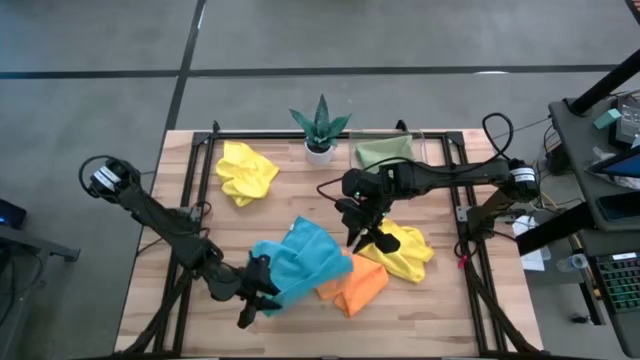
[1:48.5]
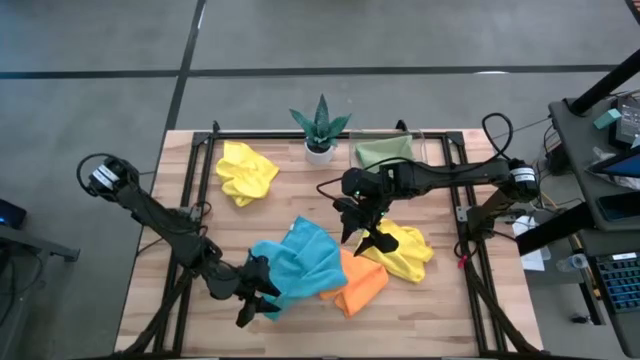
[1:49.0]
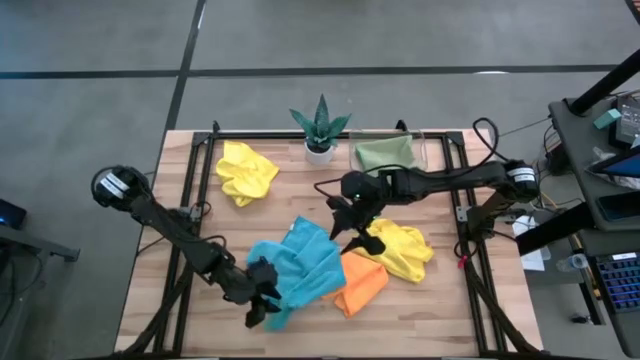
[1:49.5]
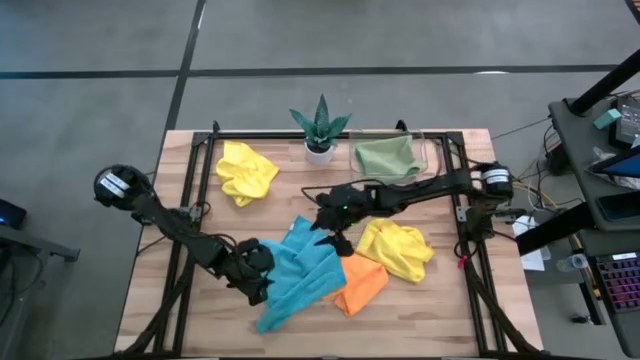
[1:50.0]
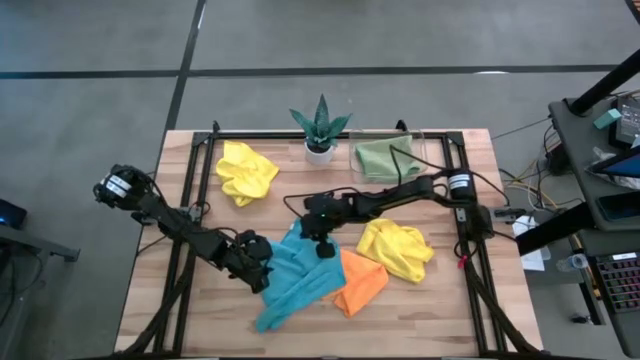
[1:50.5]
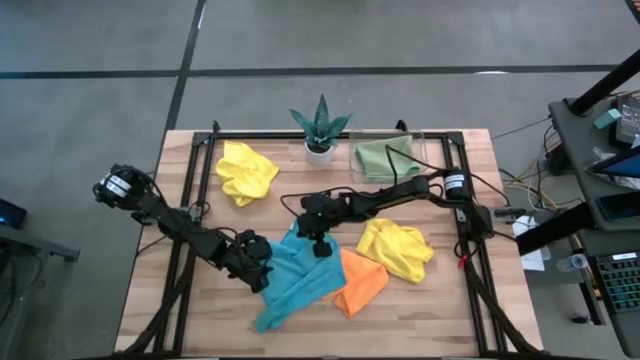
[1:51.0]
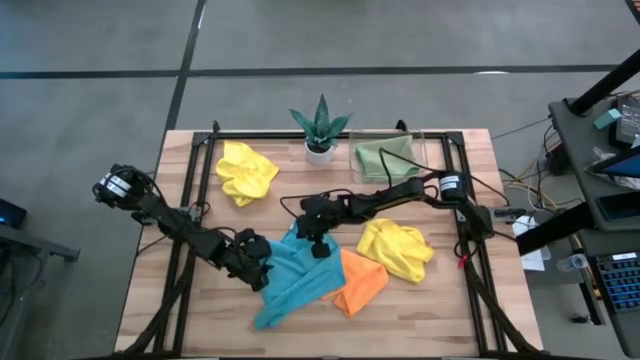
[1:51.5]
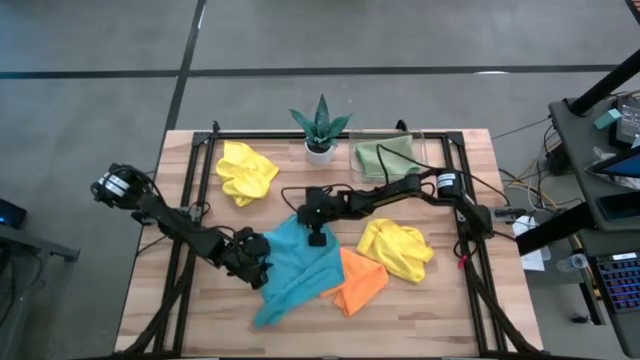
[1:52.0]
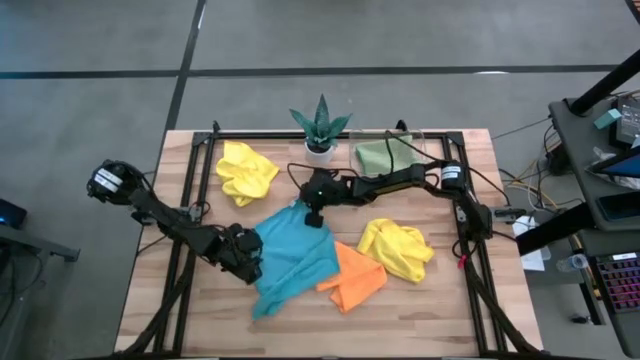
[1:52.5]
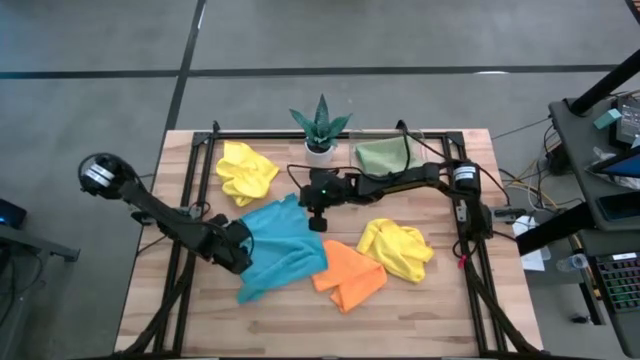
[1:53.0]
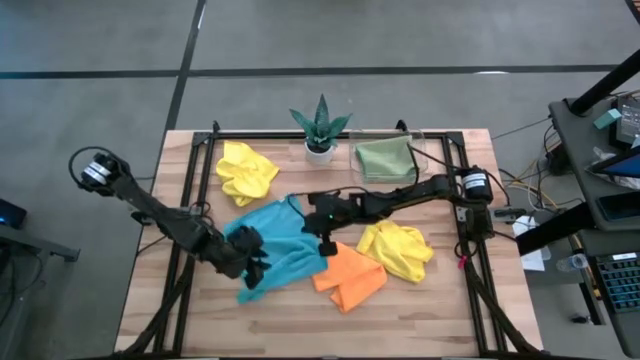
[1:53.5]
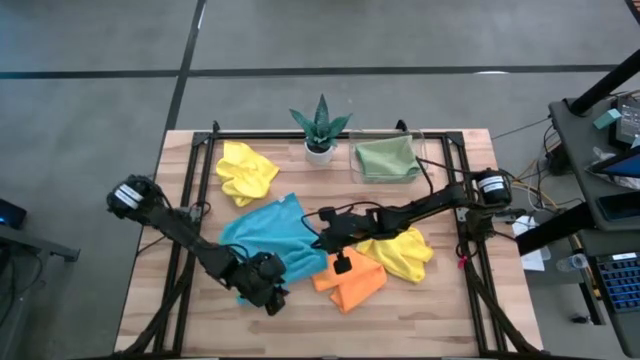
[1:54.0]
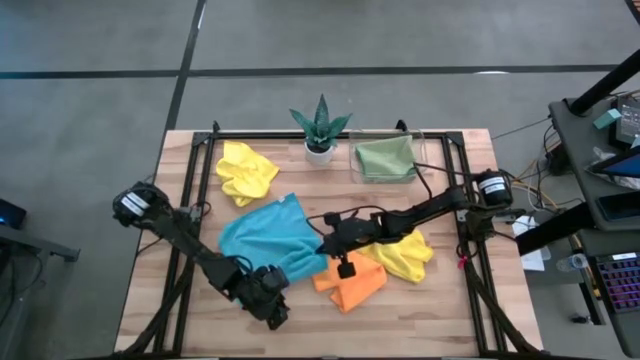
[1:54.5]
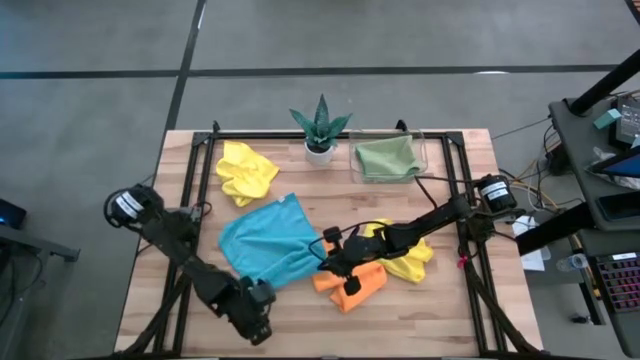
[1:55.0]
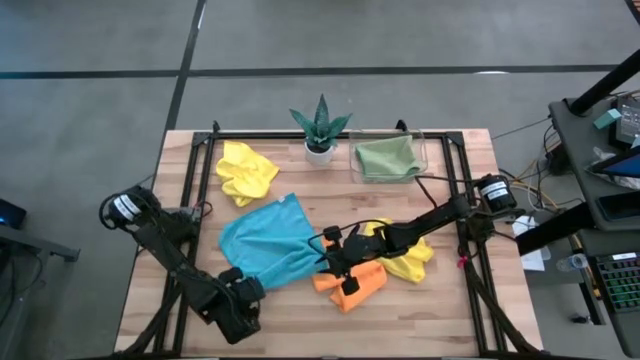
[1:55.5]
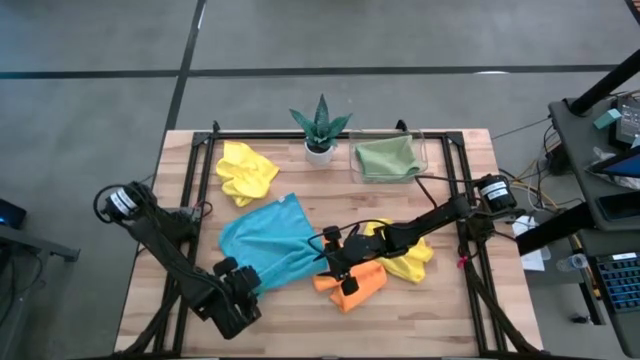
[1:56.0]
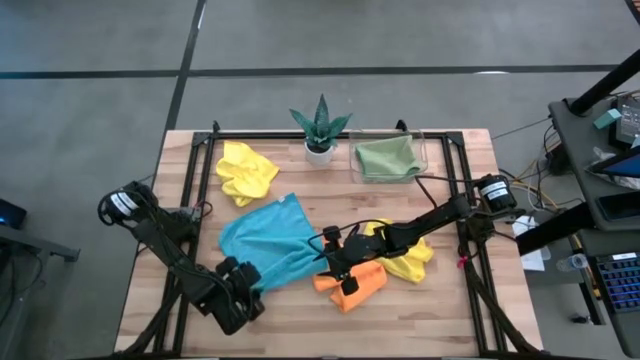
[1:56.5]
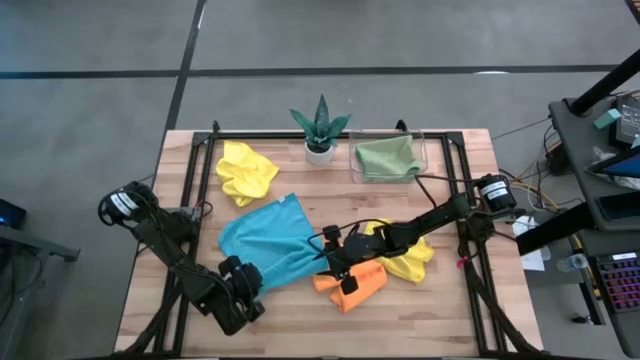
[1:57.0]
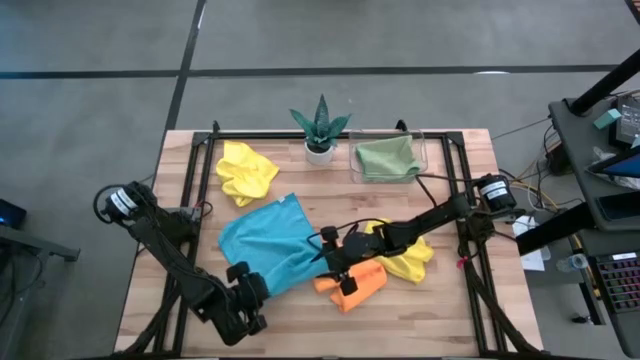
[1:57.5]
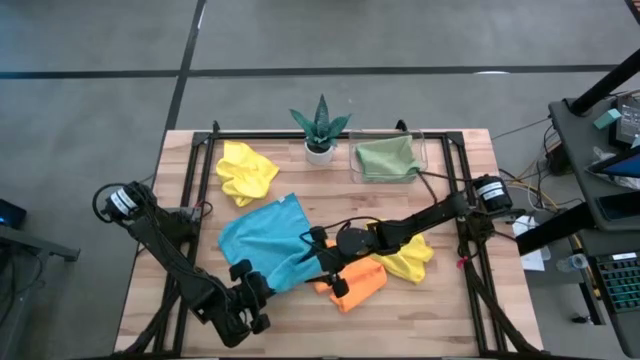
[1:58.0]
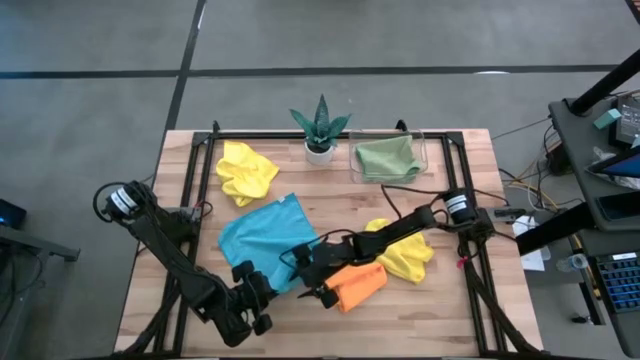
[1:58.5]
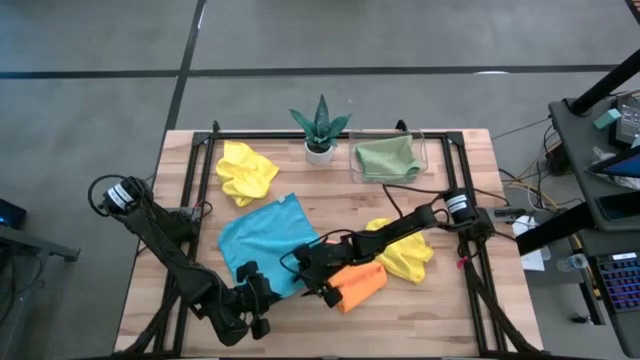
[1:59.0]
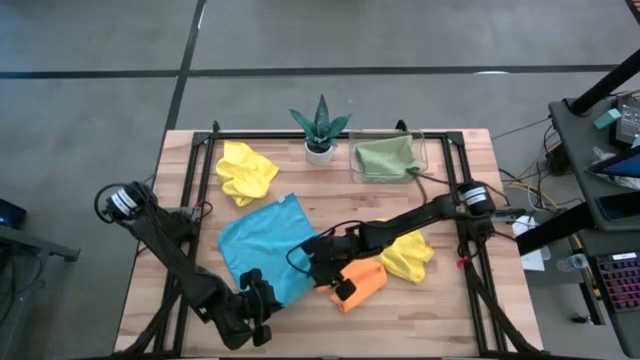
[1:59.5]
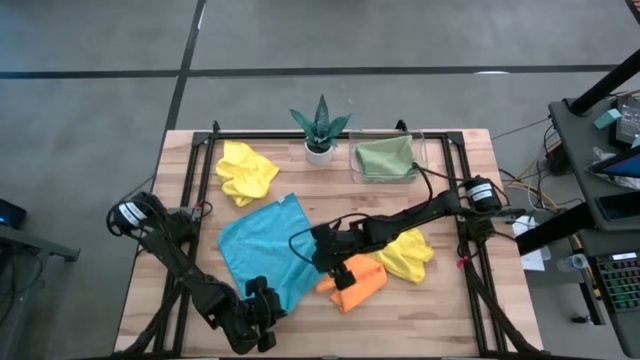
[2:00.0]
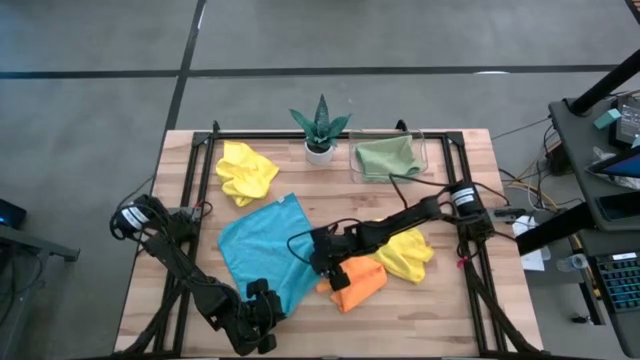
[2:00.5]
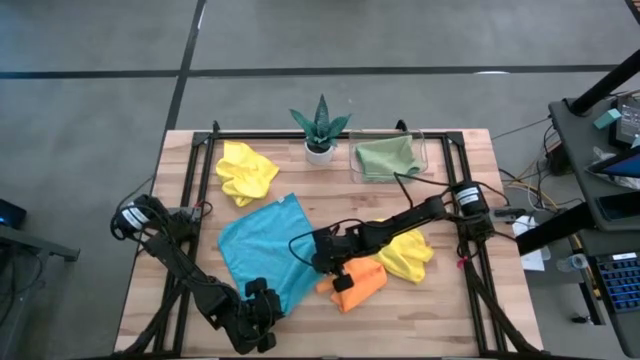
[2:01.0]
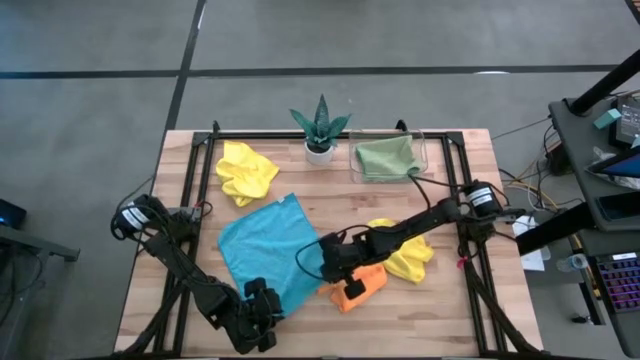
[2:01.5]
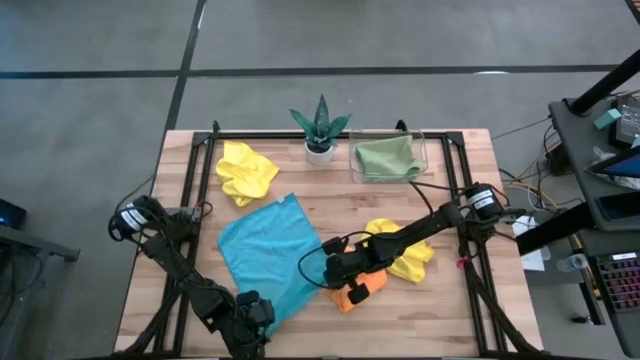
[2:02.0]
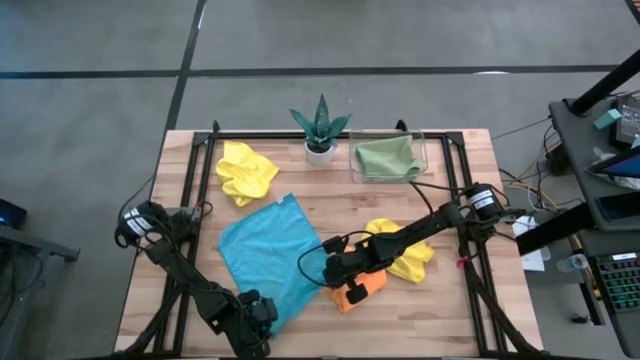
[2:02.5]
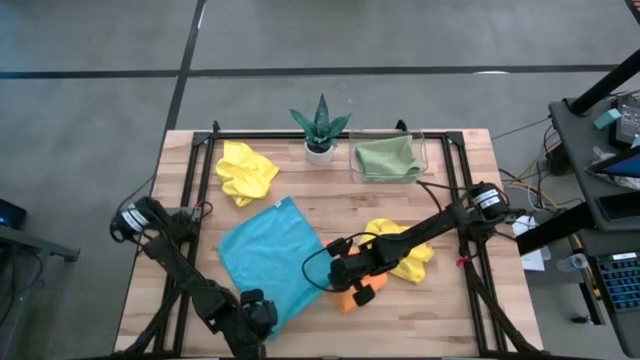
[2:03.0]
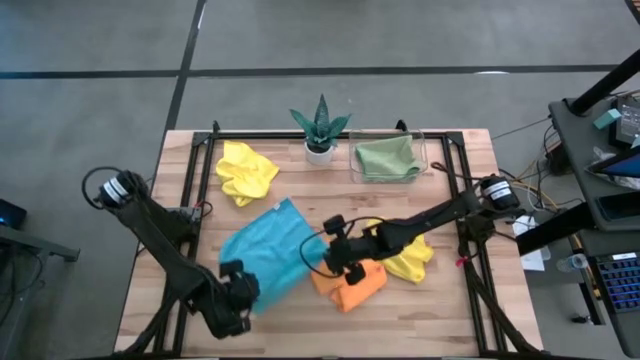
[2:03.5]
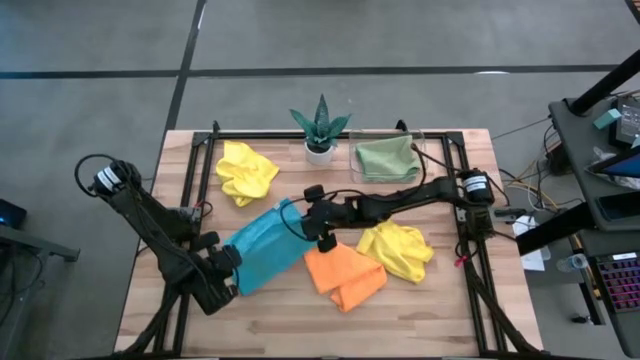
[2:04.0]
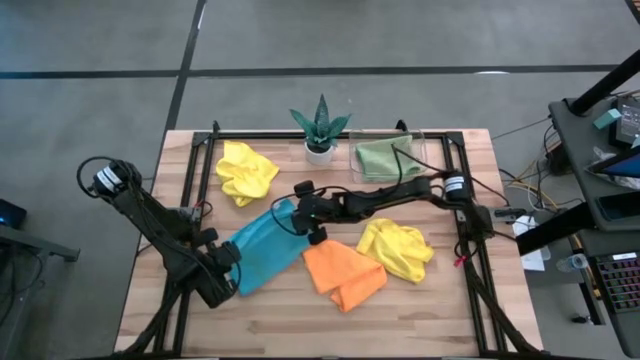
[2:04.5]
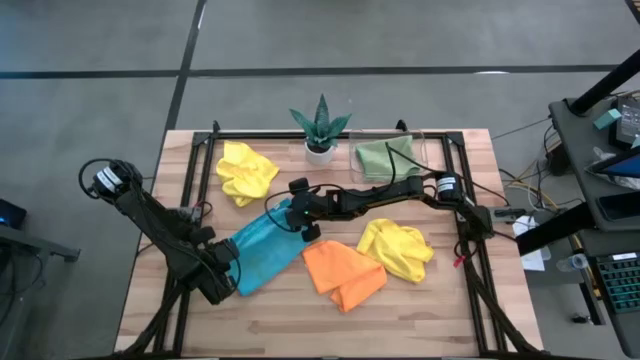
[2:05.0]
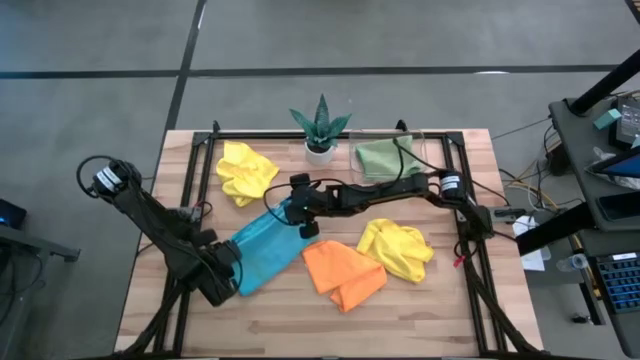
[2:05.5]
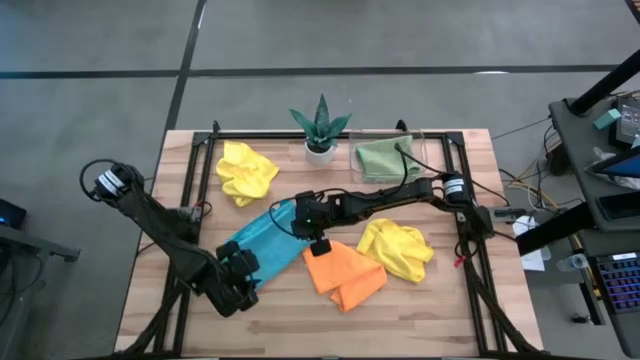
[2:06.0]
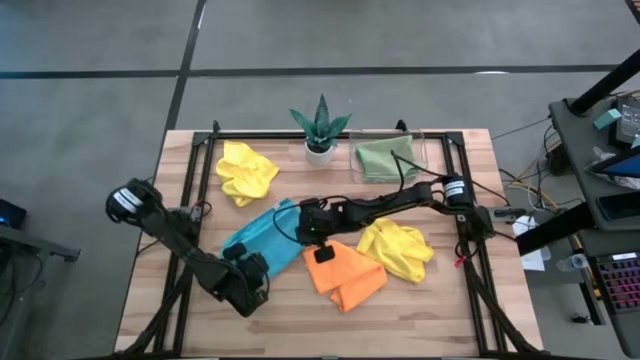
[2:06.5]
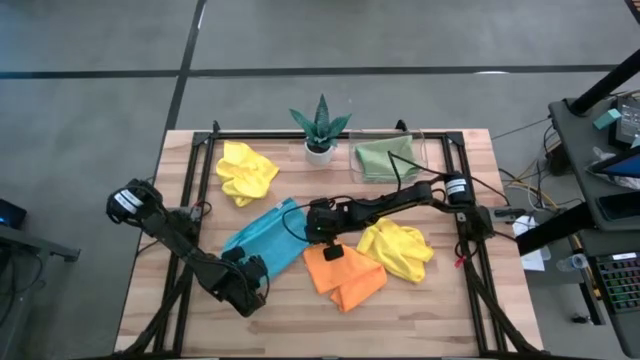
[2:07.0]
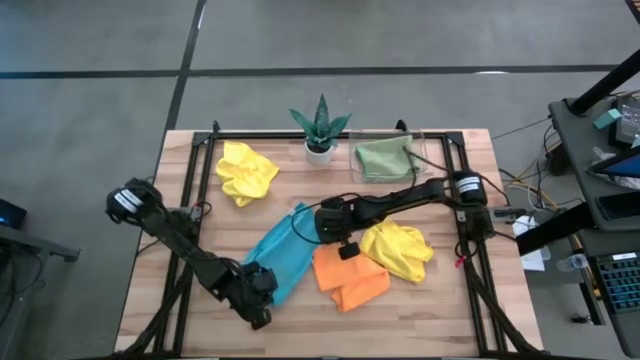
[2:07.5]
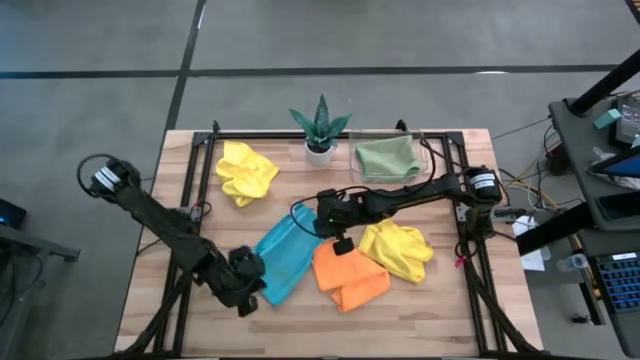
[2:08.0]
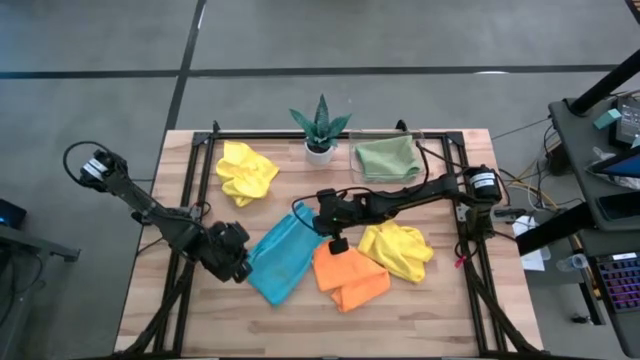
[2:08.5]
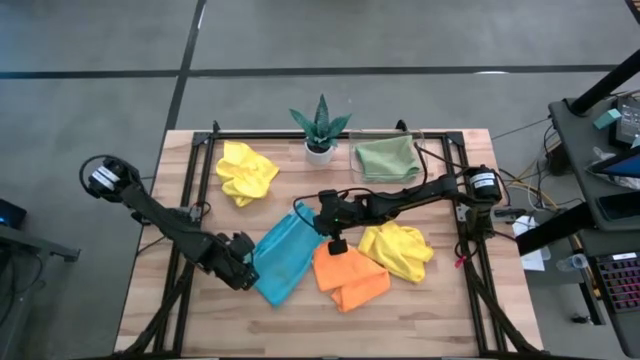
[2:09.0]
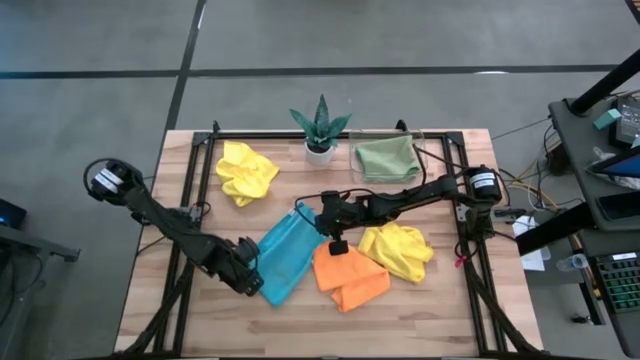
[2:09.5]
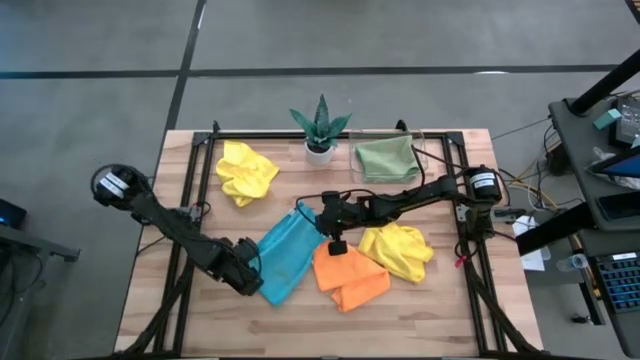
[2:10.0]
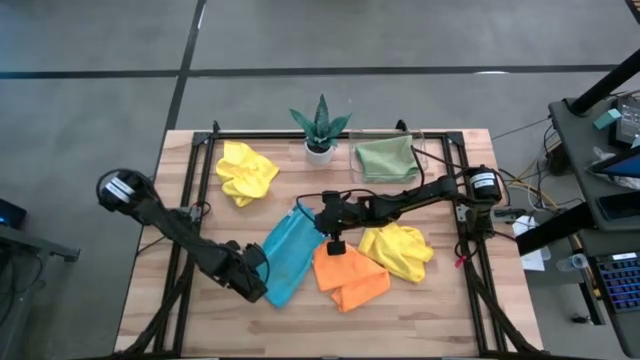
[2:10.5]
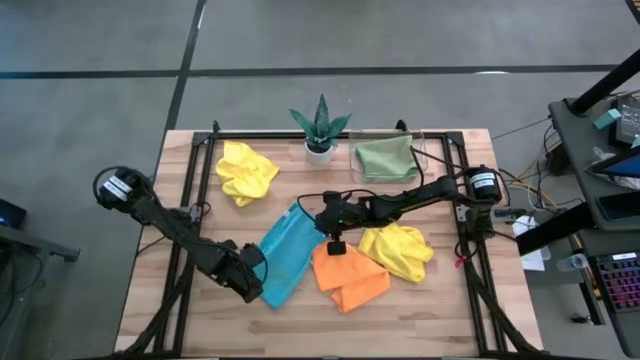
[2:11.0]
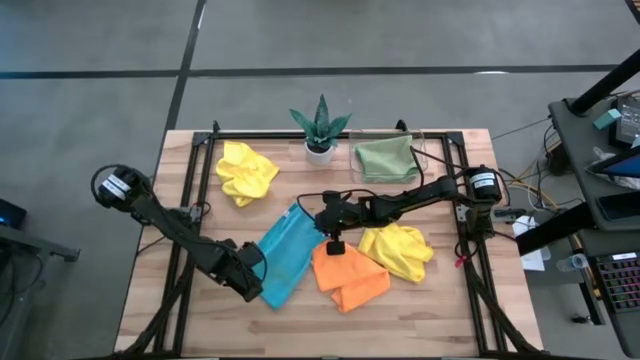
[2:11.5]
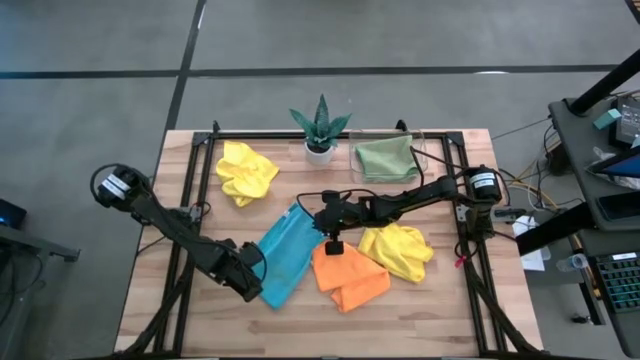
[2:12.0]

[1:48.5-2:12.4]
Task: Fold microfiber towels
Fold the blue microfiber towel
